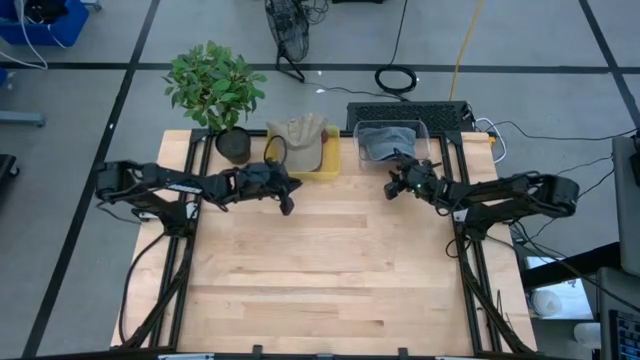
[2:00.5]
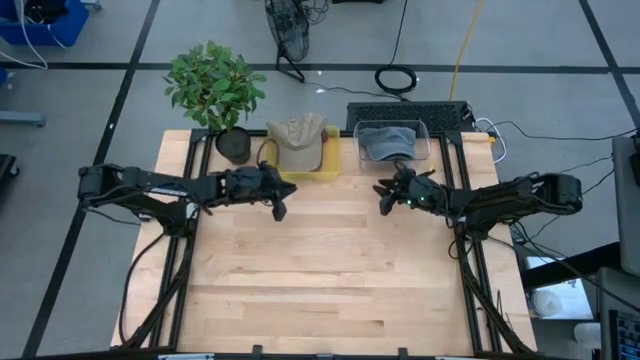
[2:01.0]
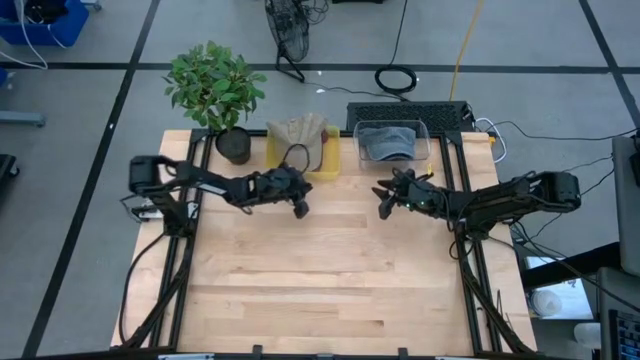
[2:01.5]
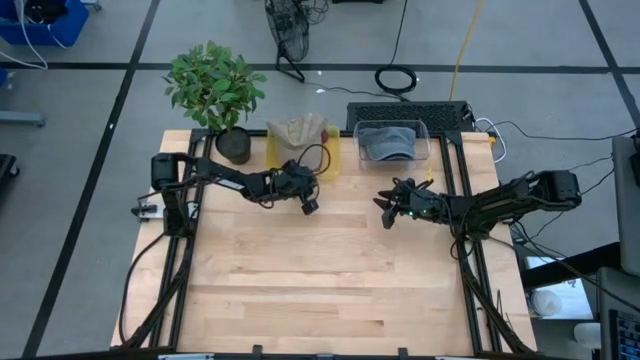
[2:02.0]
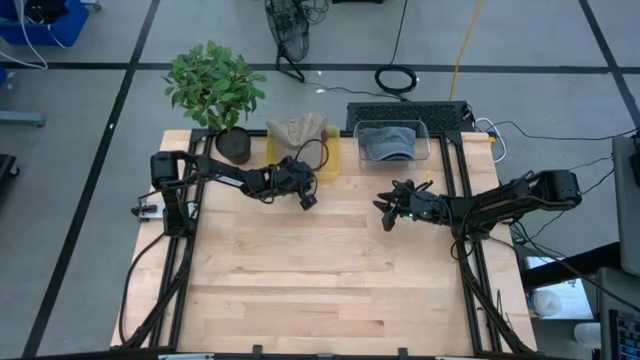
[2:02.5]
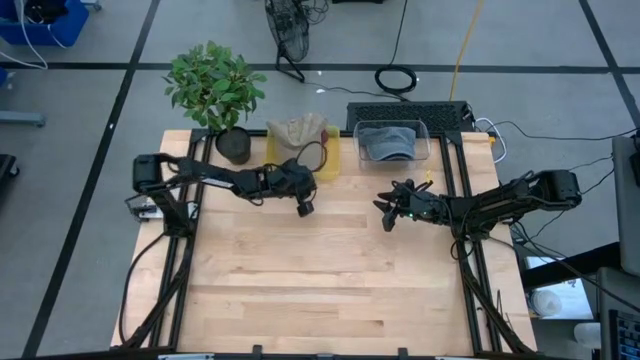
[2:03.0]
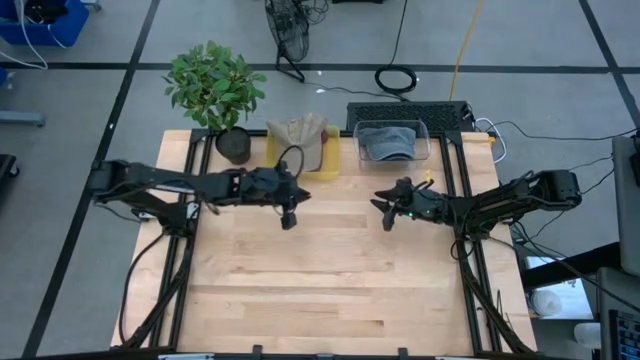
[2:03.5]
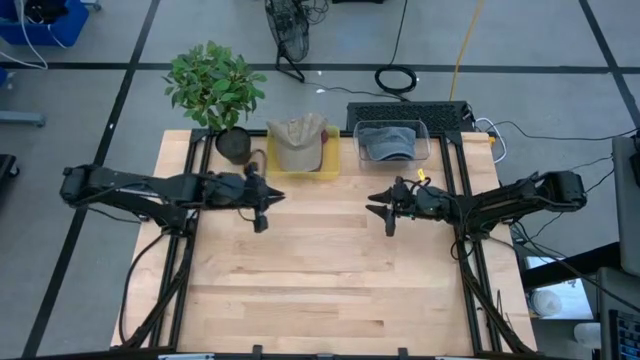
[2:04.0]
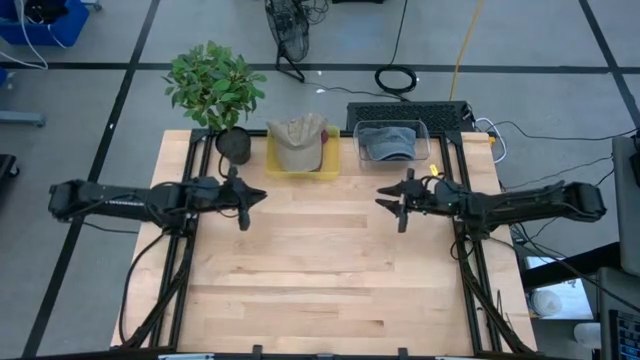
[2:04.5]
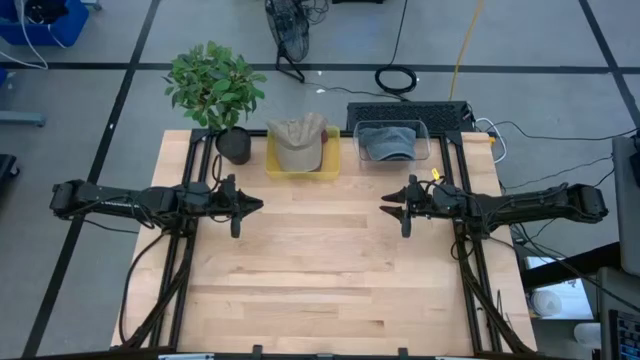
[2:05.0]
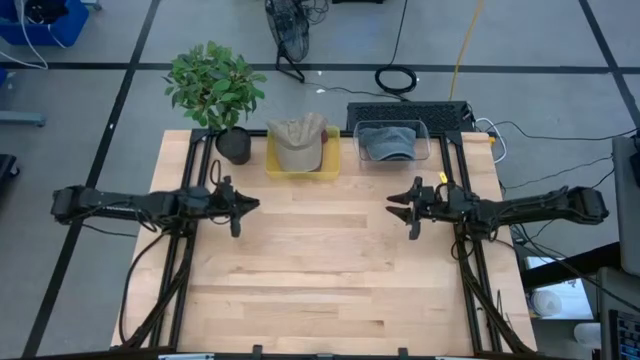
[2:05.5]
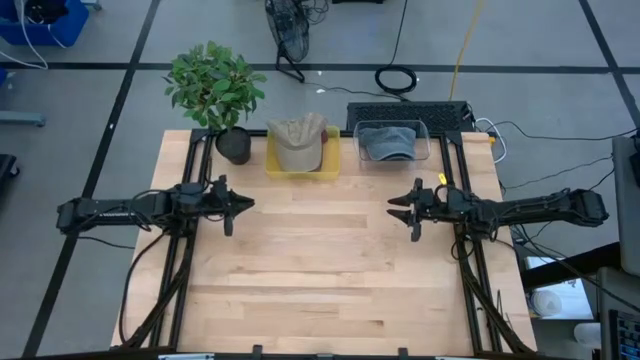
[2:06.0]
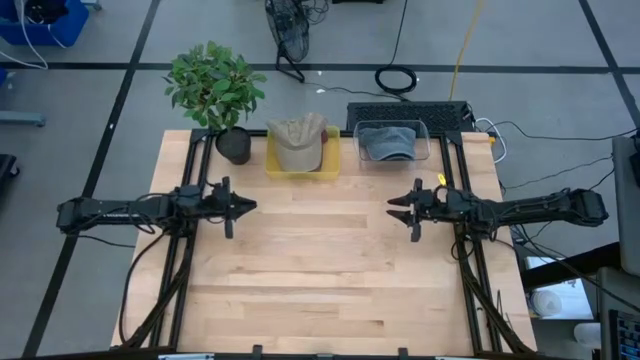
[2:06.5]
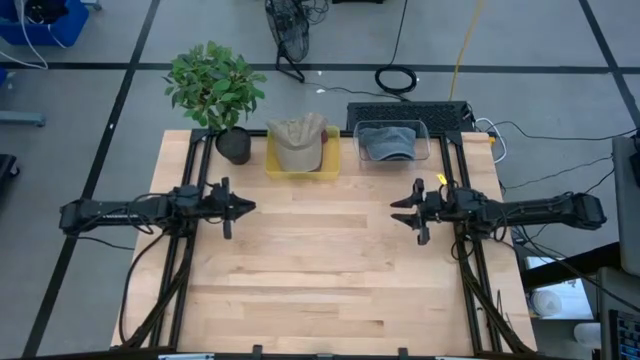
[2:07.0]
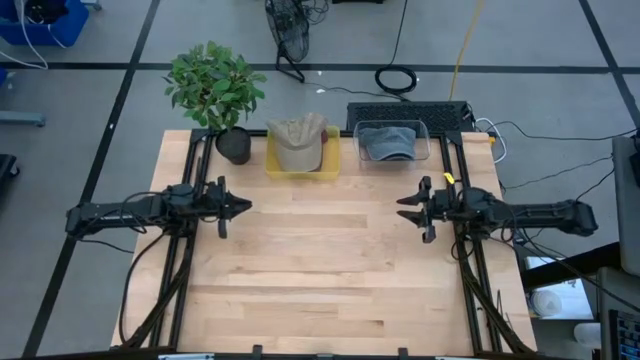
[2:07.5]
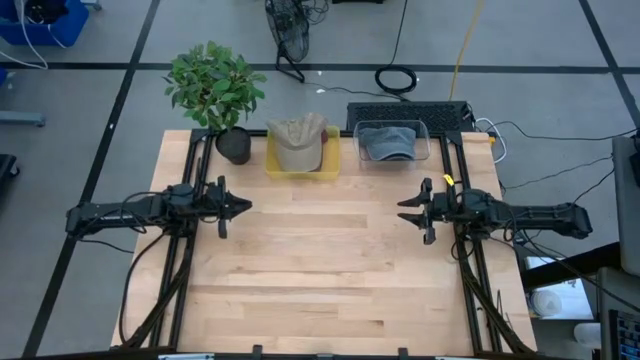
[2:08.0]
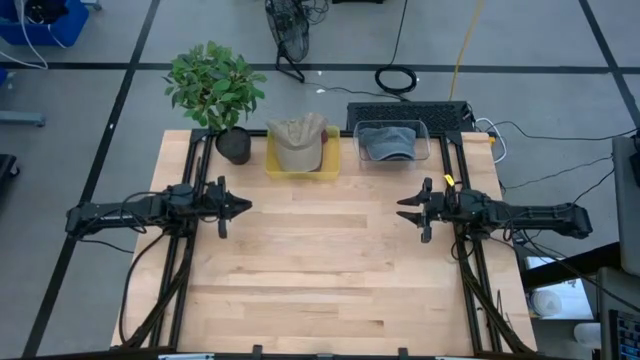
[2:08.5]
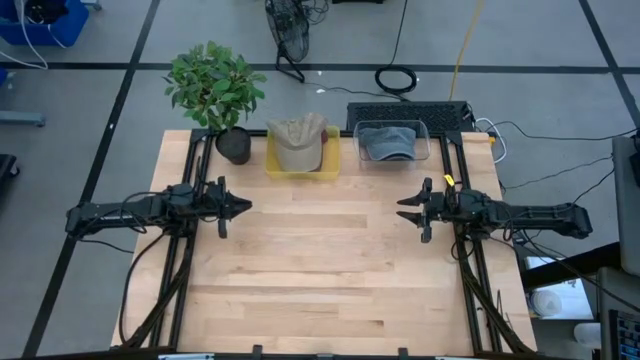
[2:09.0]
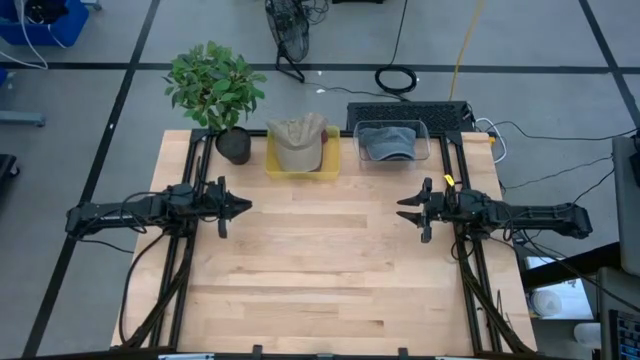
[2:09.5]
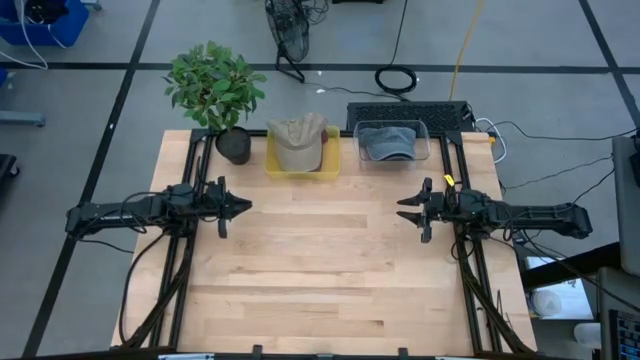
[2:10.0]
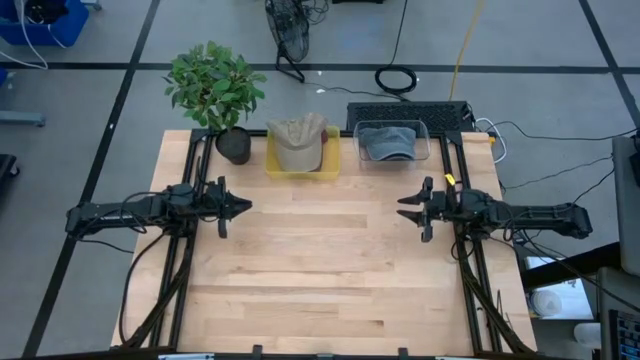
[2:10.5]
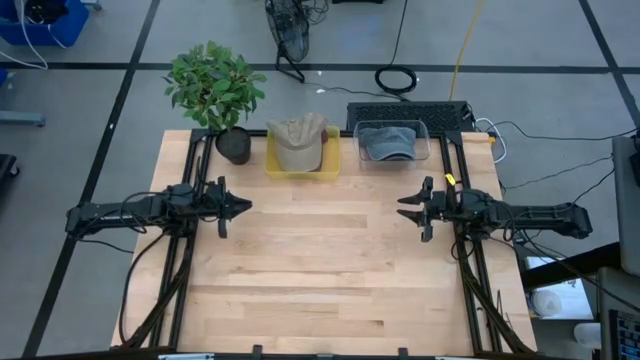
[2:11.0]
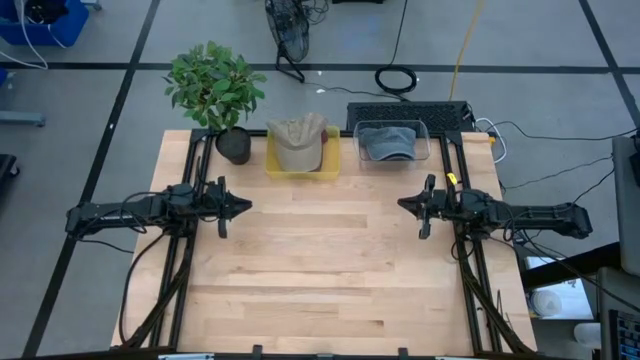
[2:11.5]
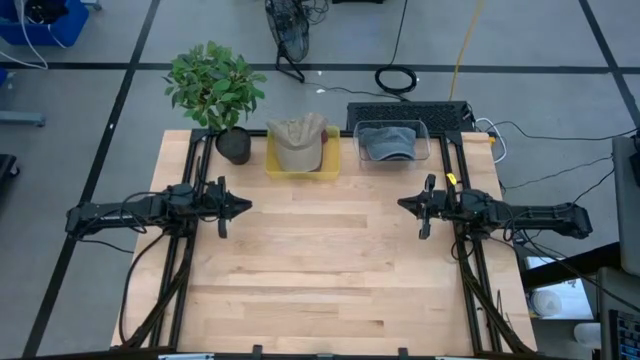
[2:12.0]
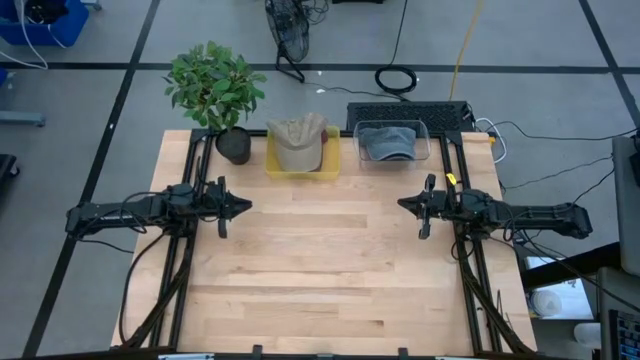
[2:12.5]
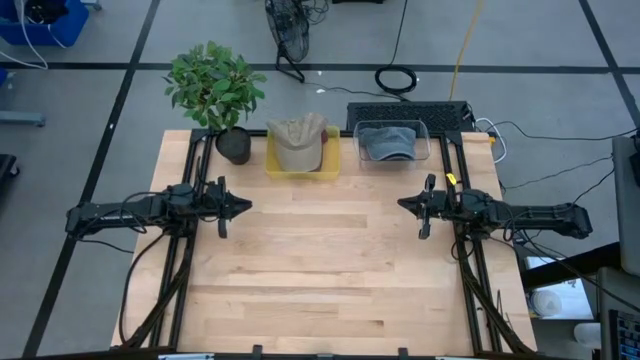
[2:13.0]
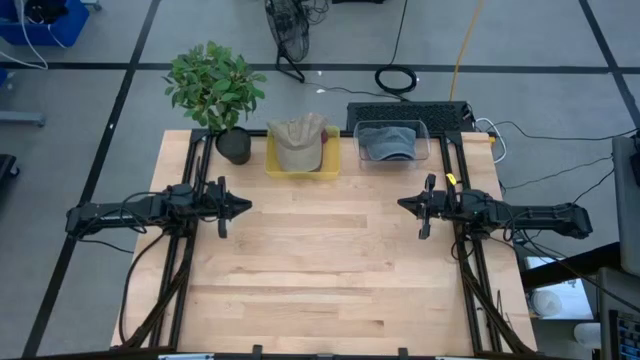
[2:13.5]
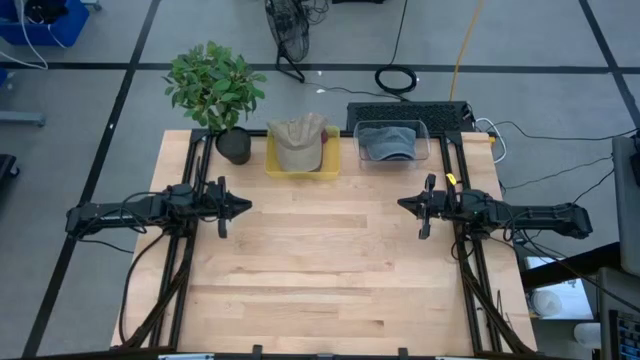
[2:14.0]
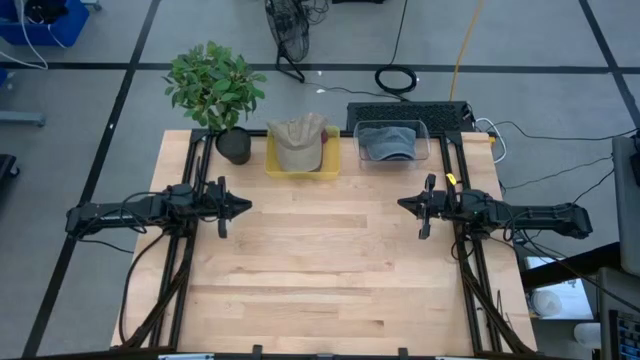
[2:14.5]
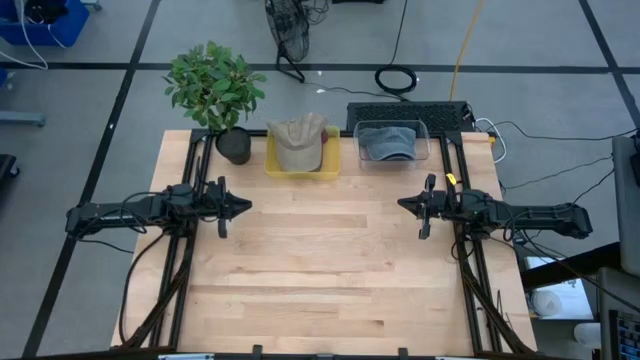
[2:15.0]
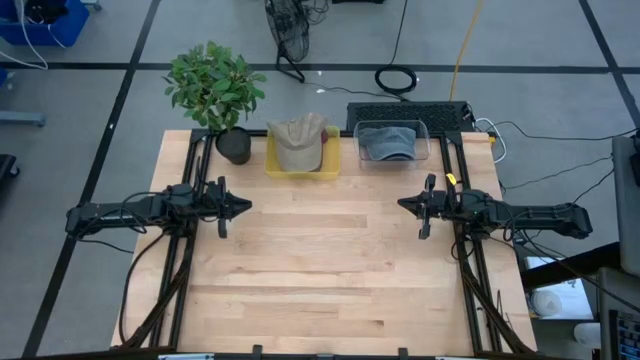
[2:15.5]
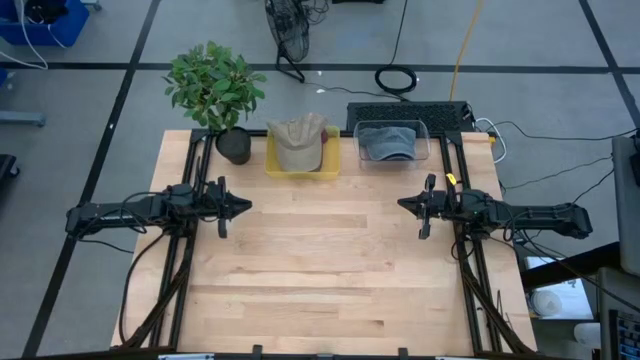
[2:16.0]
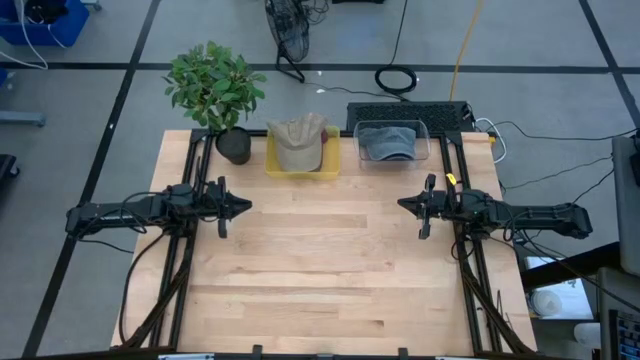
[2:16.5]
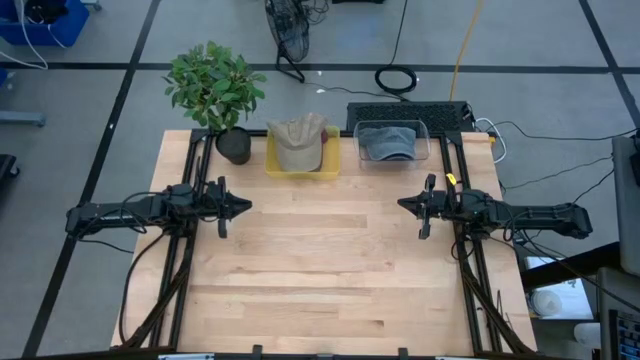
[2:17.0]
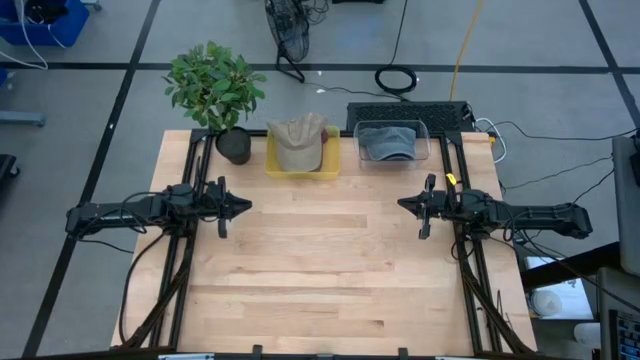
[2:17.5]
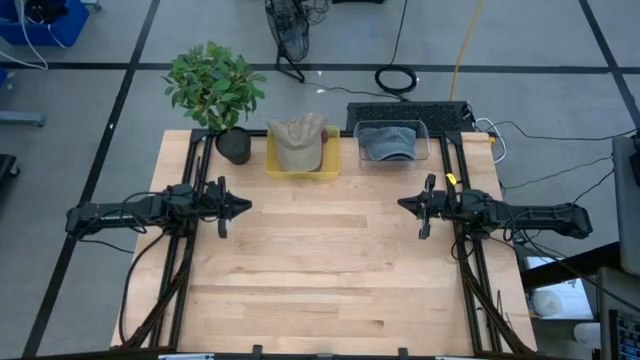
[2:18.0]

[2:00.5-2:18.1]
Task: Pick & Place hat
Return to Home Position

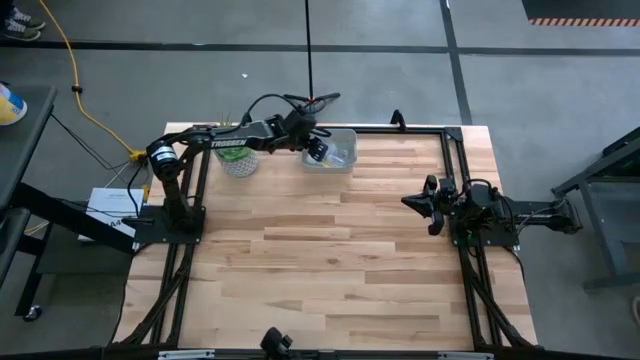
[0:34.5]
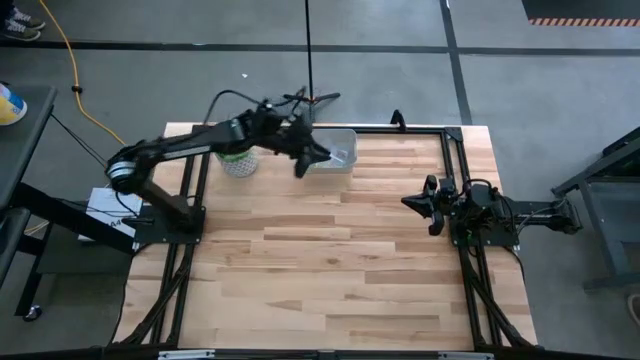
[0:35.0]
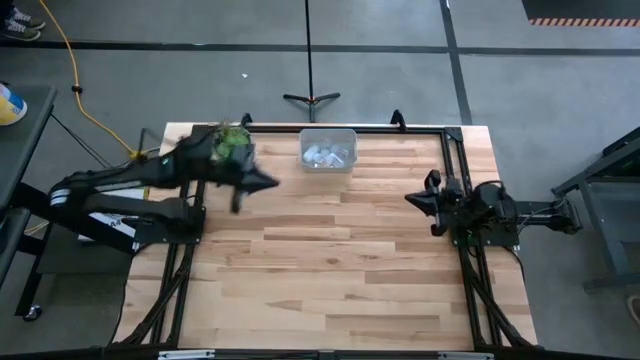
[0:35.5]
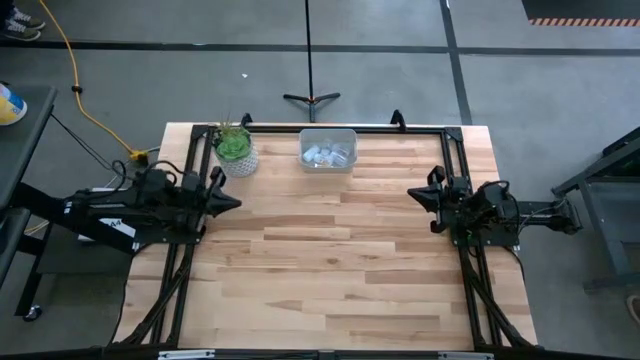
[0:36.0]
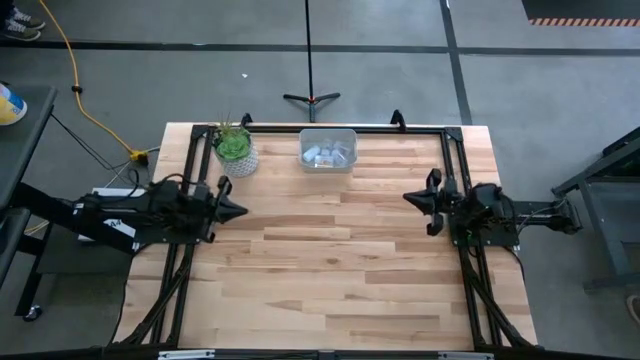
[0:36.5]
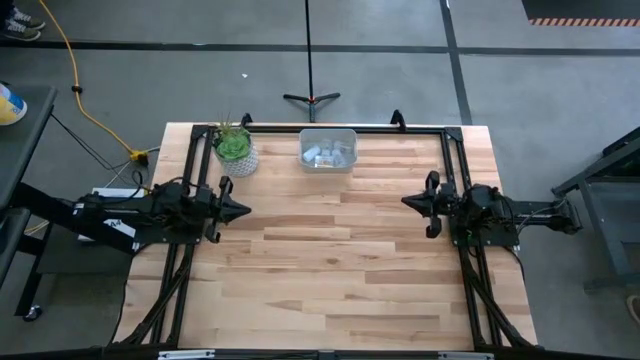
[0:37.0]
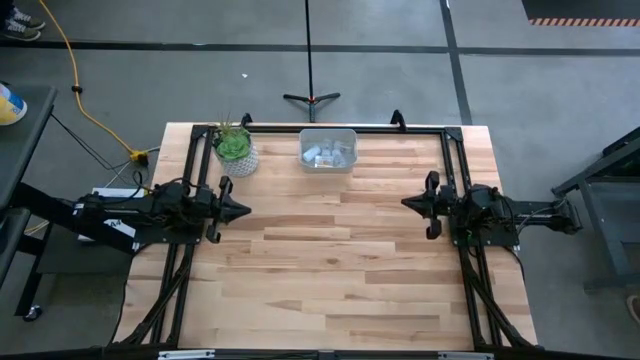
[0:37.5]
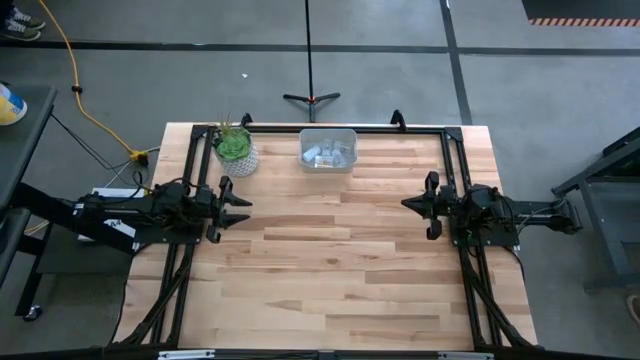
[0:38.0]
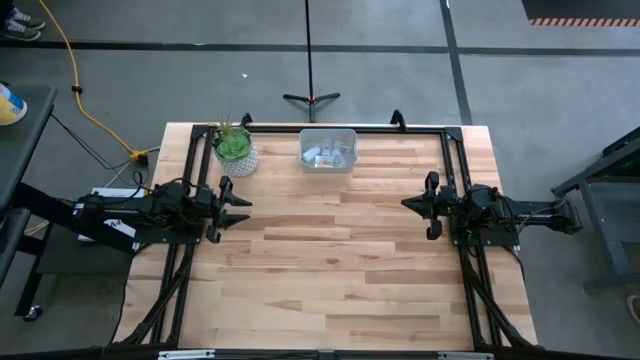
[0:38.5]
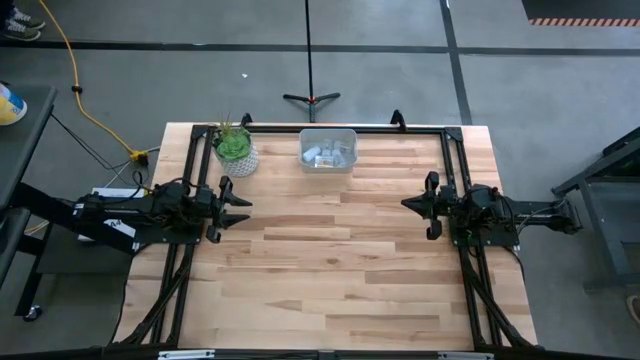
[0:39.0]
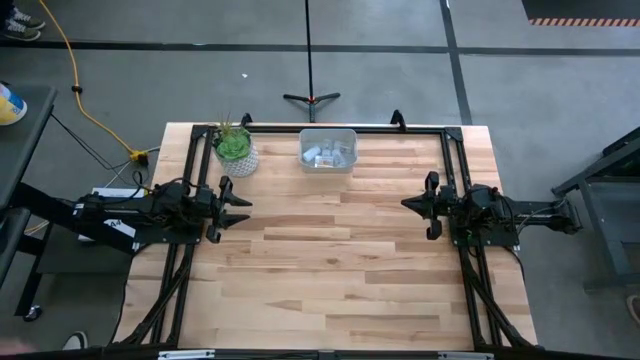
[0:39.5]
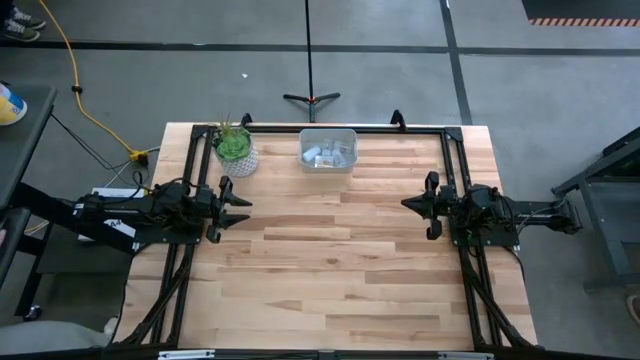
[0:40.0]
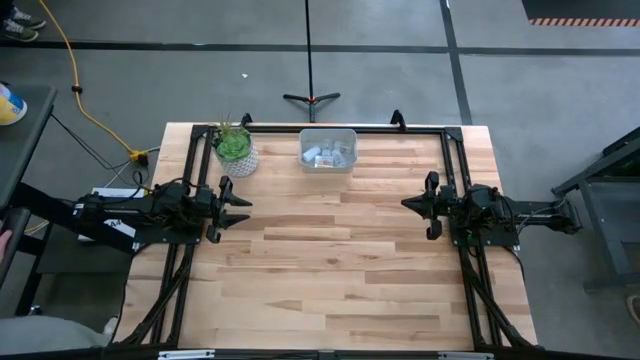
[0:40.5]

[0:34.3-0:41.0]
Task: Pick and place pill bottles into a basket
Return to Home Position
